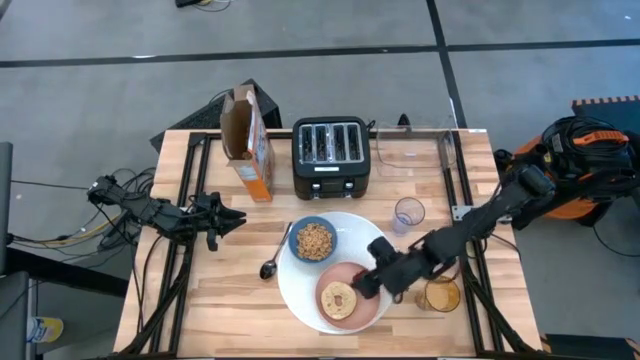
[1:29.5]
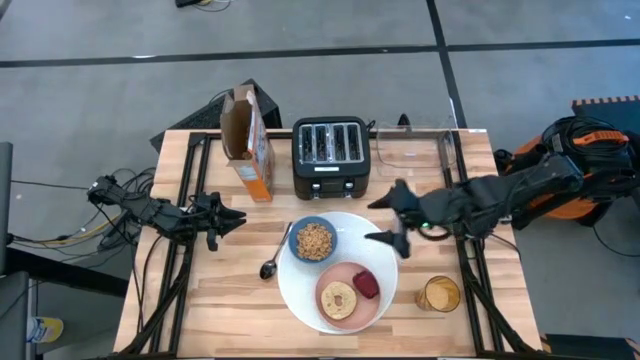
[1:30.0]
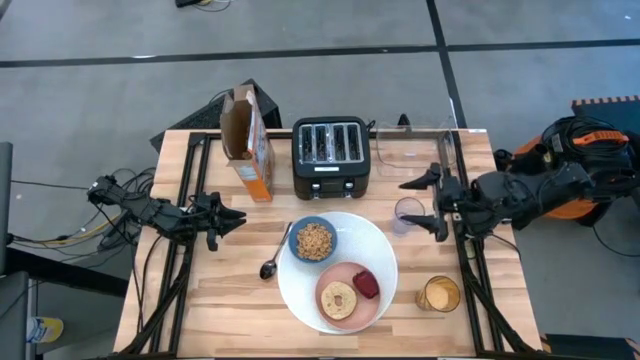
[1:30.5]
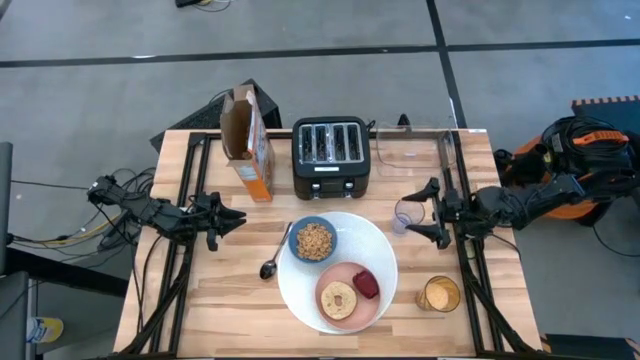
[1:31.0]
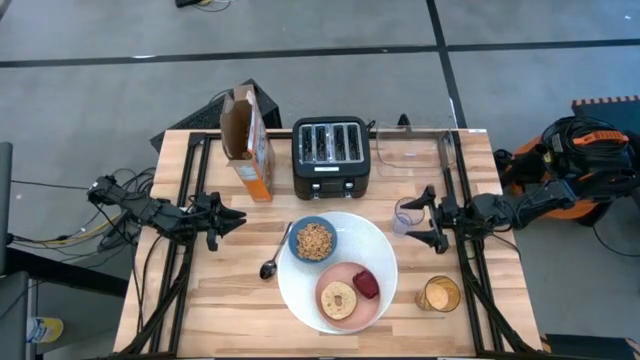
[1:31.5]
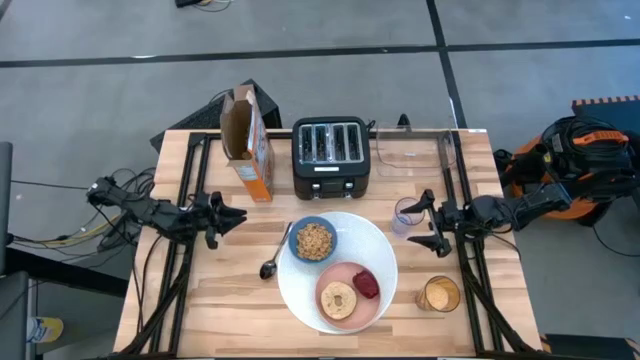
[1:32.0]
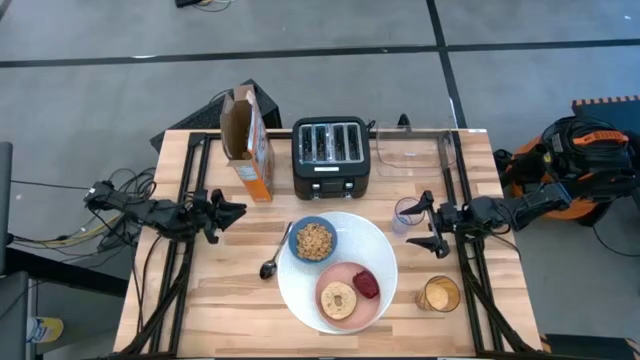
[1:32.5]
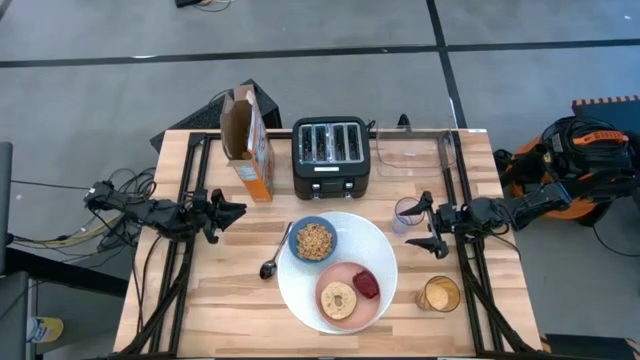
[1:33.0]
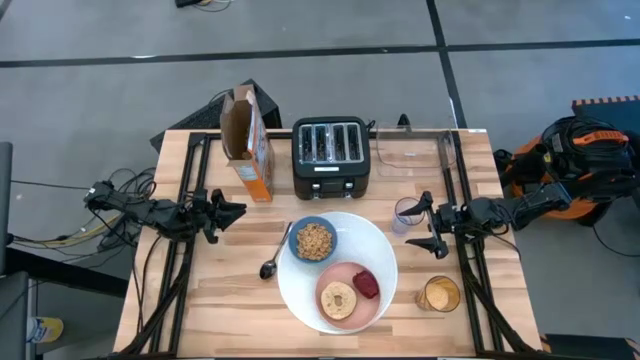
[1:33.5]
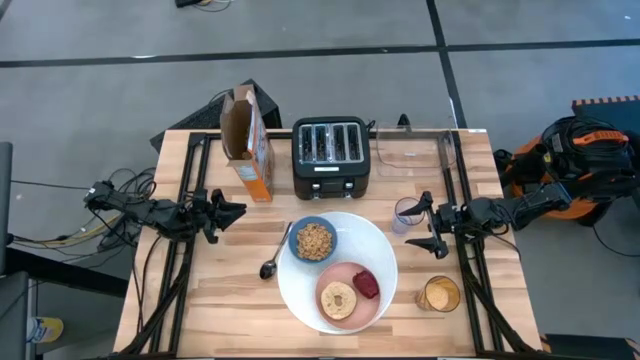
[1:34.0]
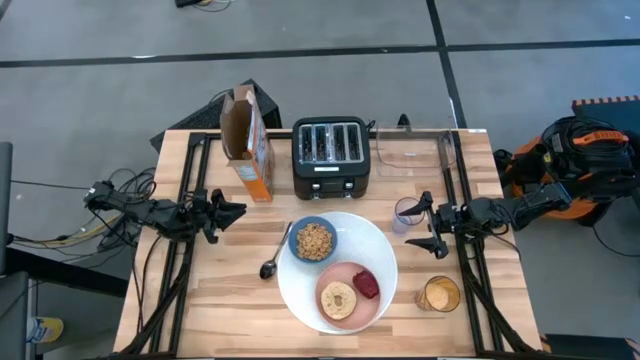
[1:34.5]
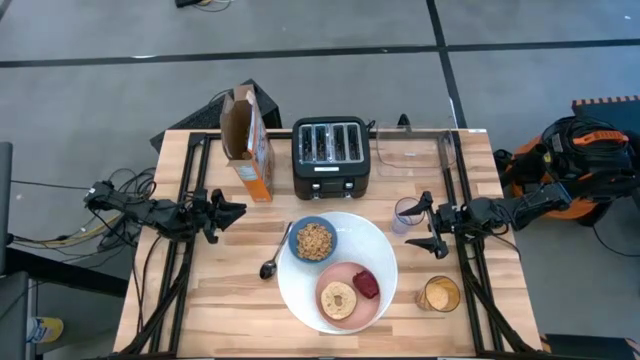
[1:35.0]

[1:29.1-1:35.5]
Task: Arrange a breakfast setting
Return to Home Position

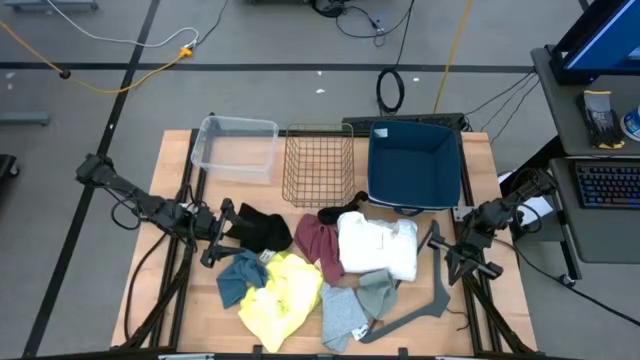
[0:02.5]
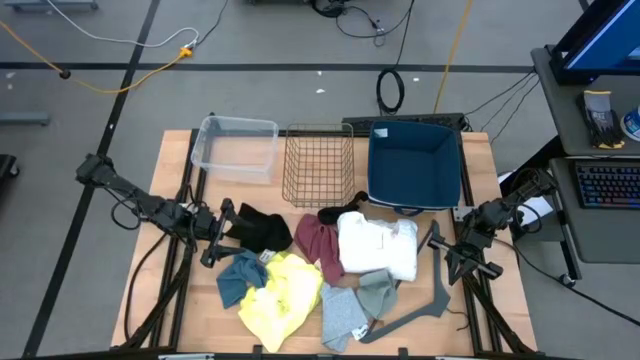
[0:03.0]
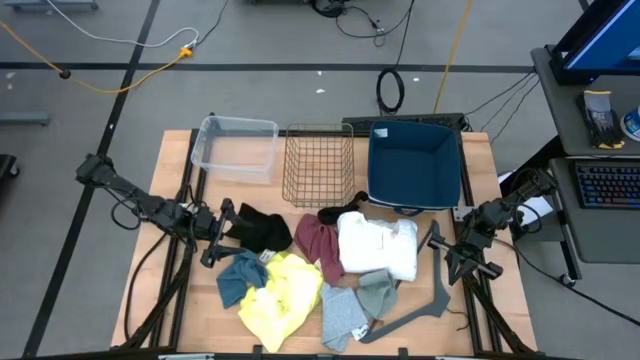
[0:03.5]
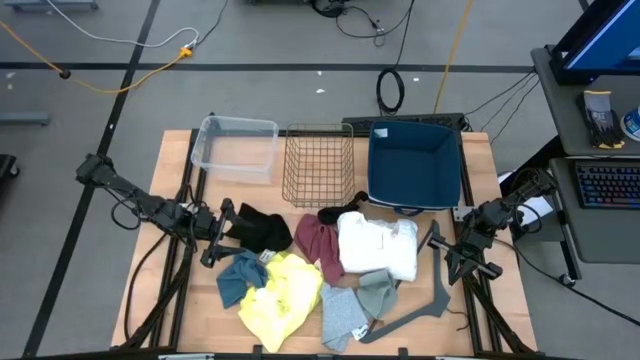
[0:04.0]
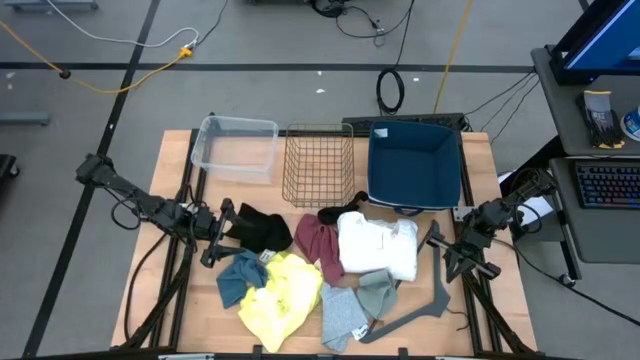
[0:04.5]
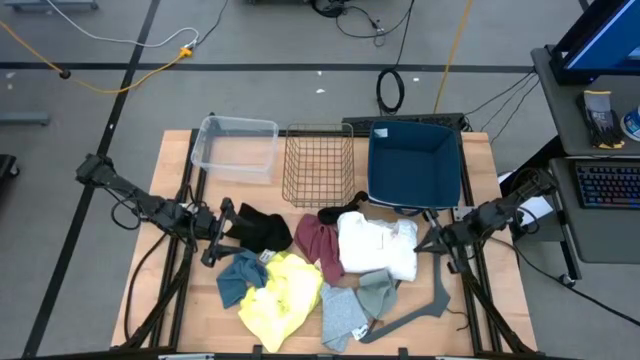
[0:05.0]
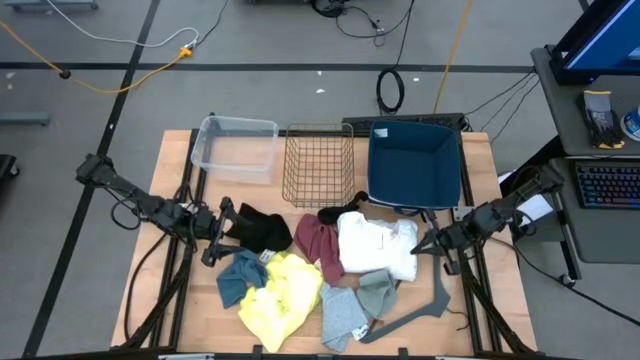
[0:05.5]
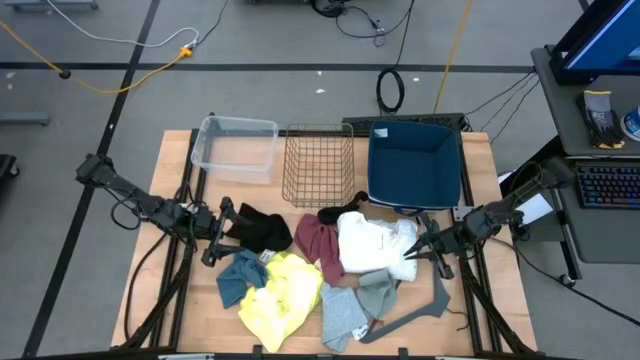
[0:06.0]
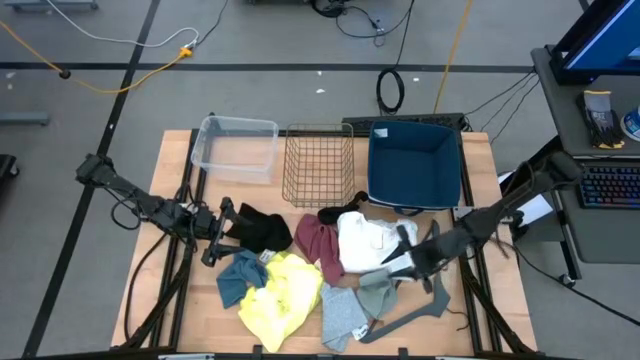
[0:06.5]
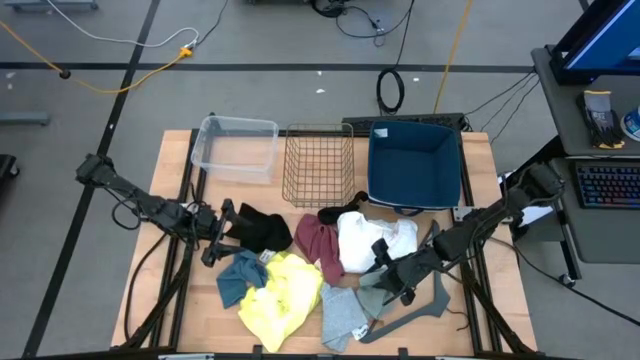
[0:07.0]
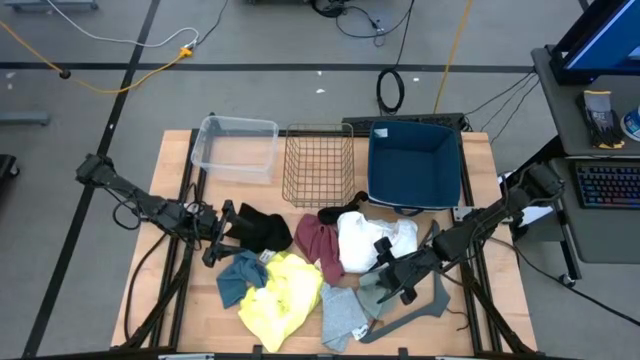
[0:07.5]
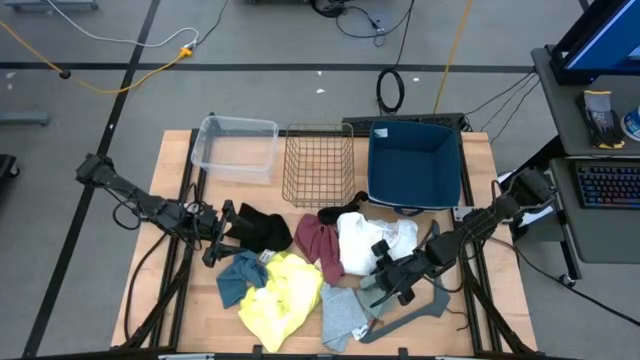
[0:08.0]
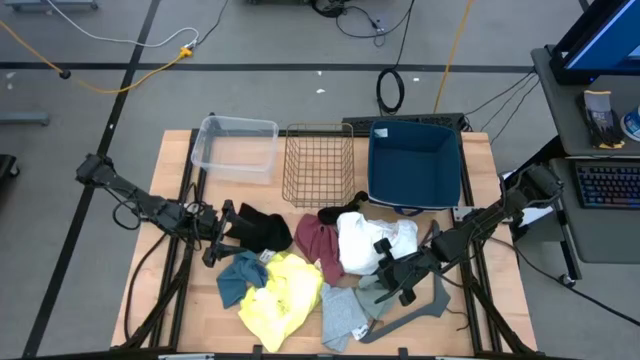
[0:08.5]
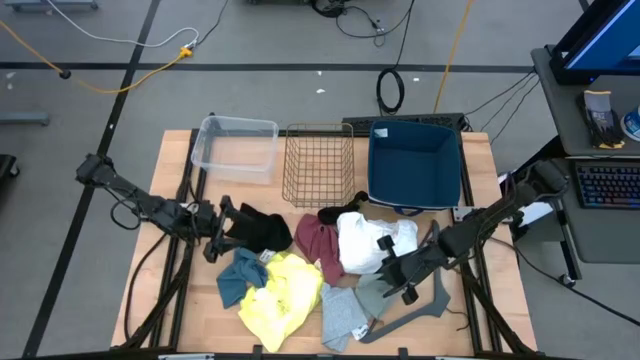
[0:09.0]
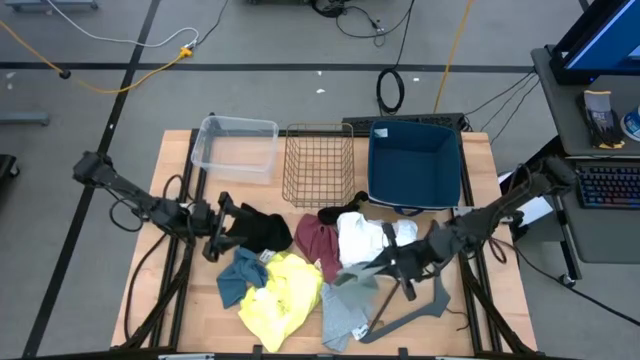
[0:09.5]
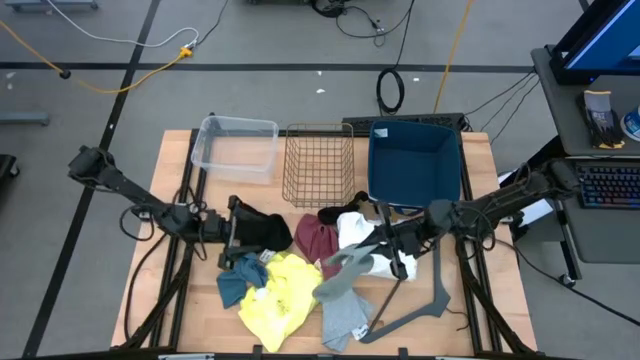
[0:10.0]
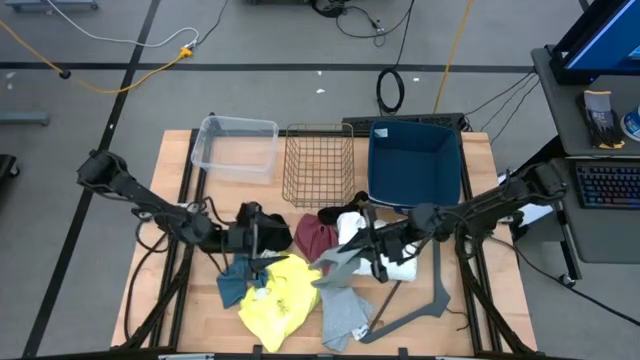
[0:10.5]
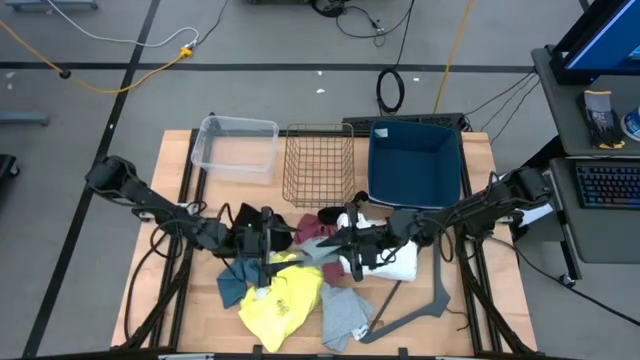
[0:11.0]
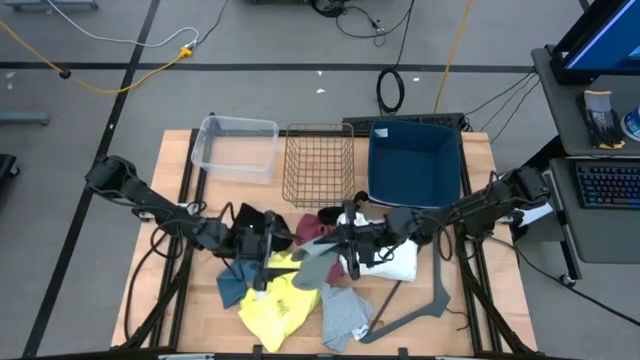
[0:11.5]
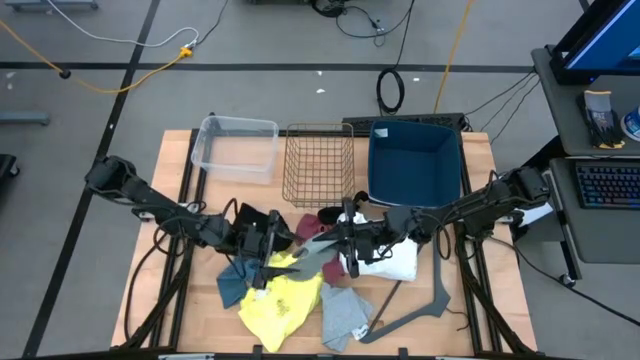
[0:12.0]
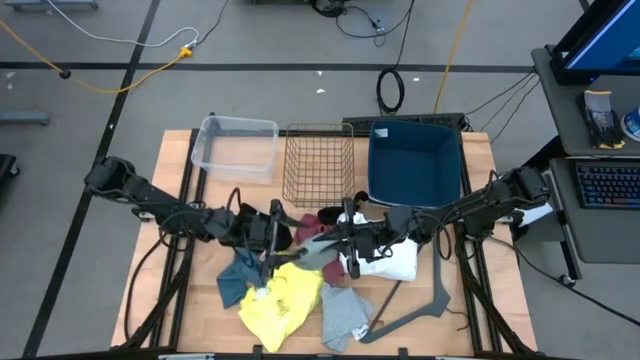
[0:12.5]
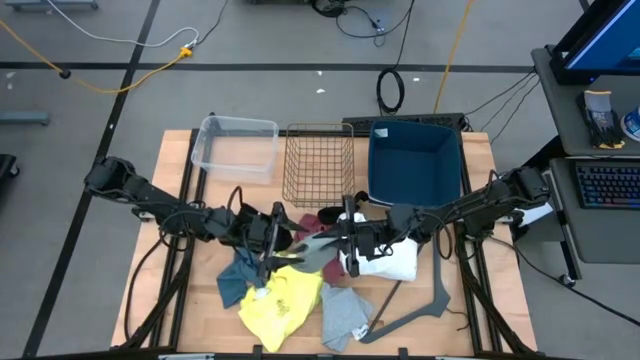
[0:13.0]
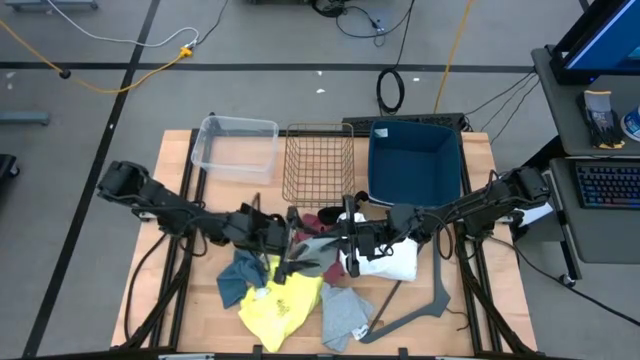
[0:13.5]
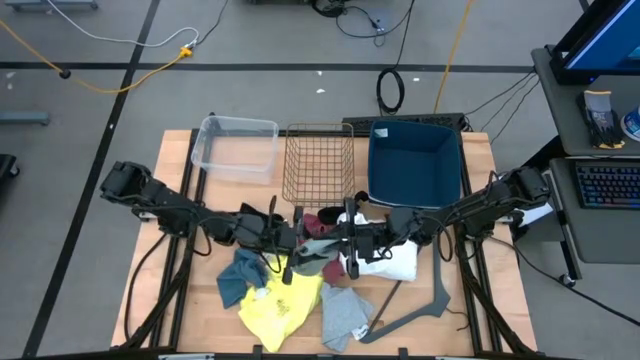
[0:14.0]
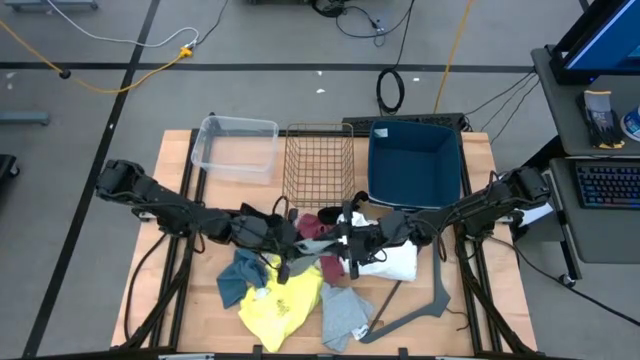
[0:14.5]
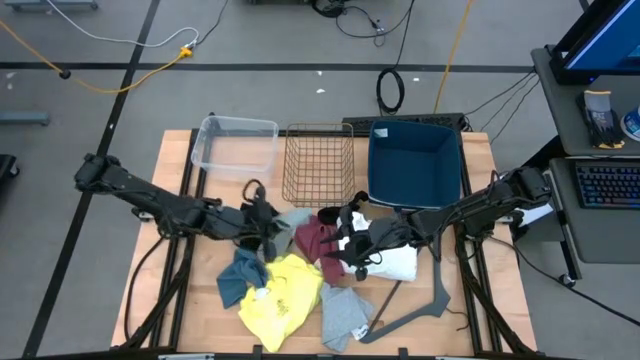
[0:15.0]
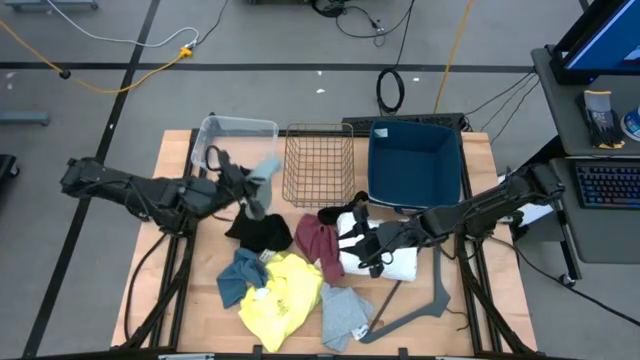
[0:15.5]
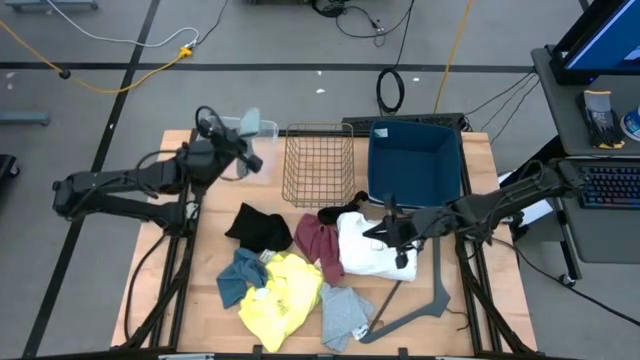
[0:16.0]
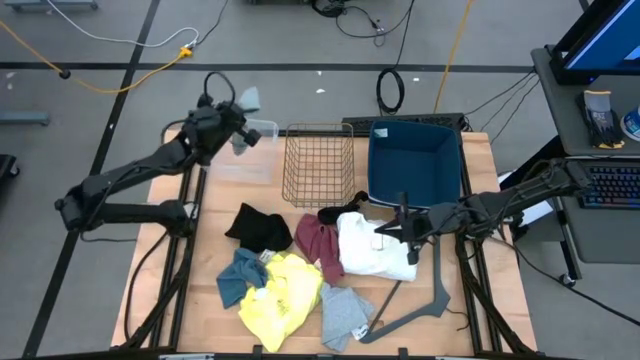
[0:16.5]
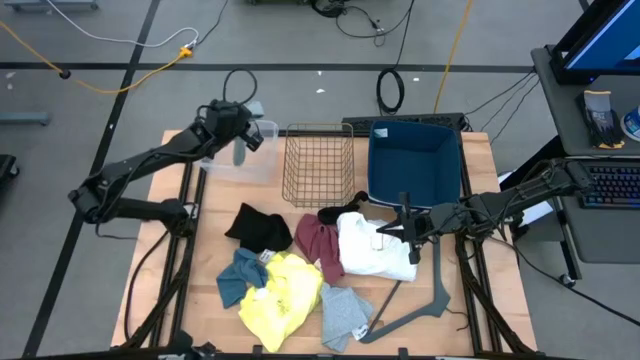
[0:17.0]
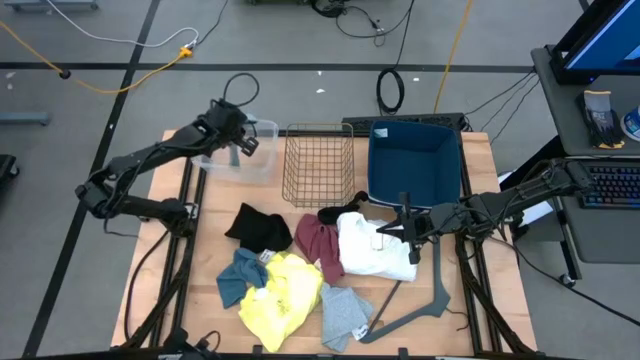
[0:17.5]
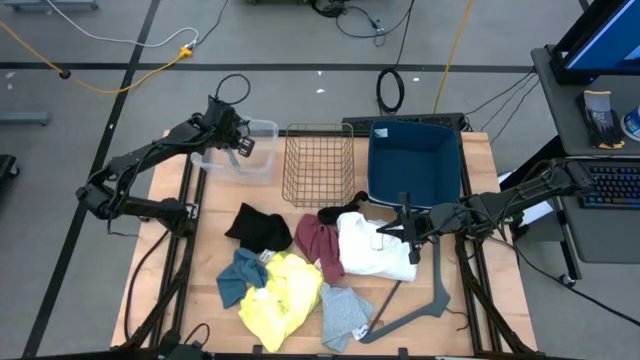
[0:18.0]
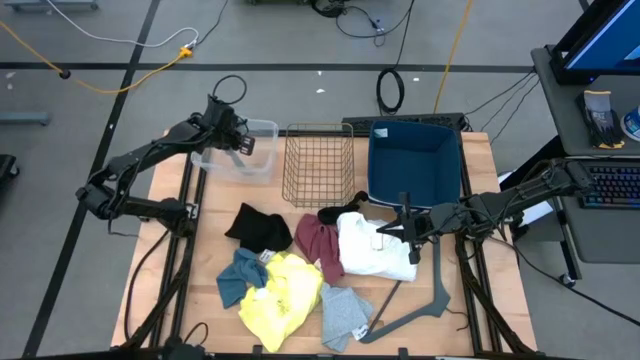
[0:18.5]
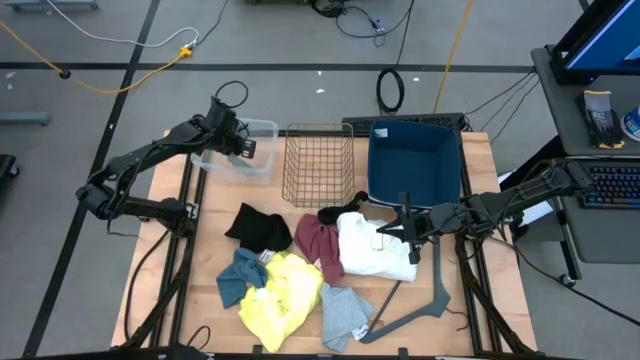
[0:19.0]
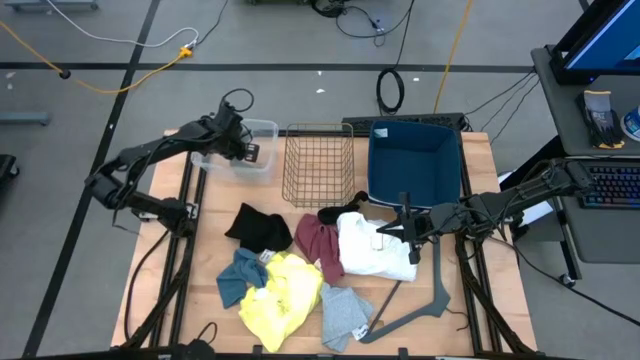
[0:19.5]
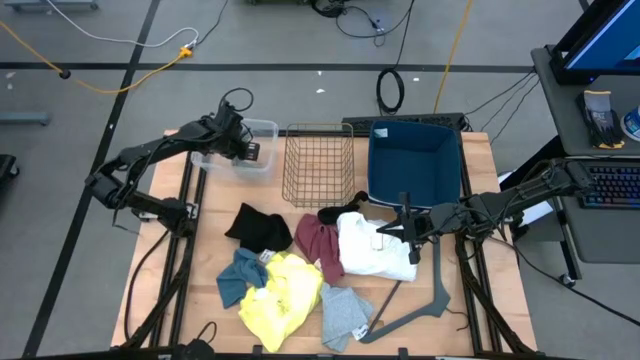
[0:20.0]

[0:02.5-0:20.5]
Task: Pick & Place Cloths
Put the gray sock into the transparent bin
